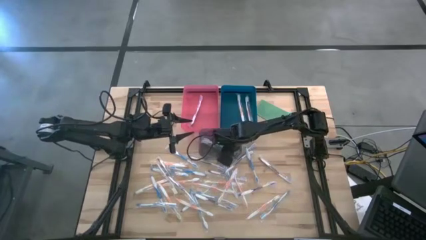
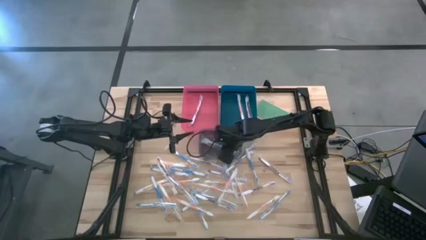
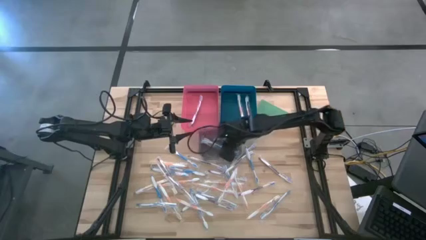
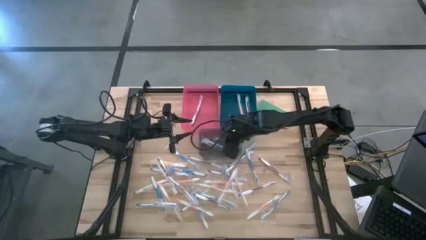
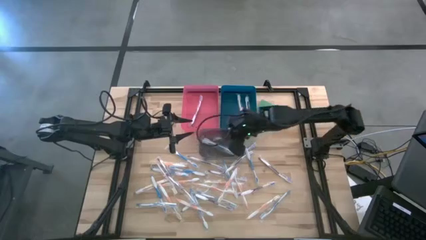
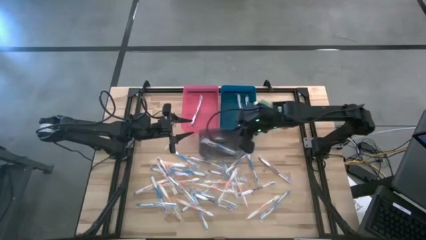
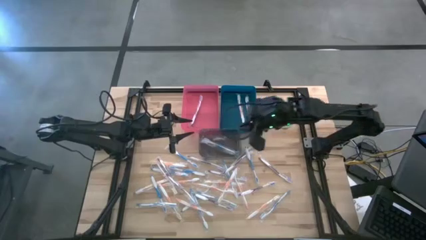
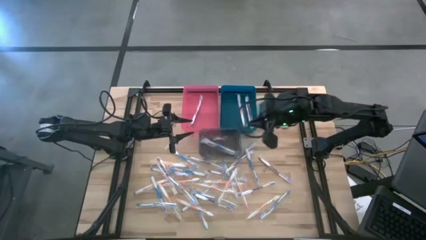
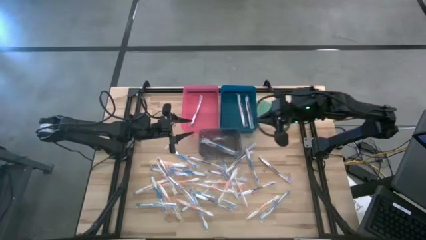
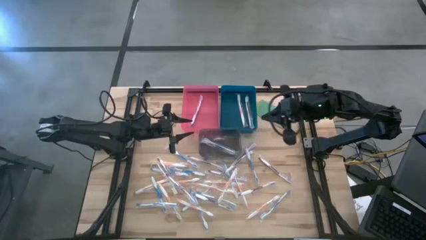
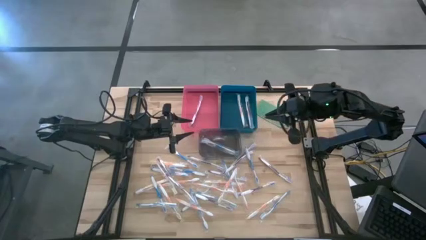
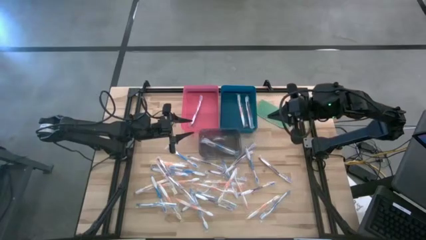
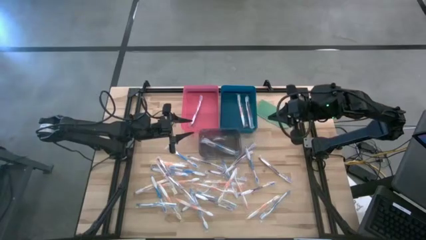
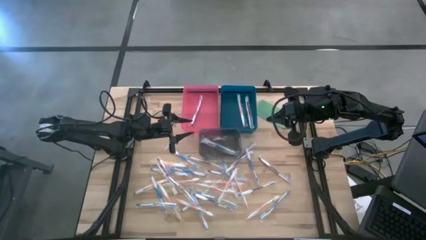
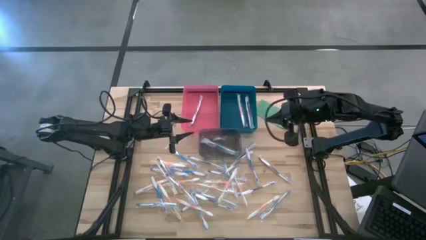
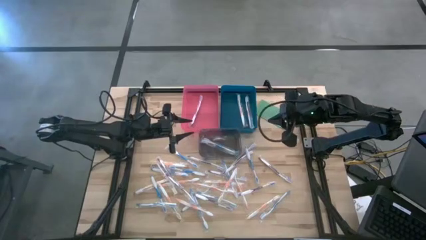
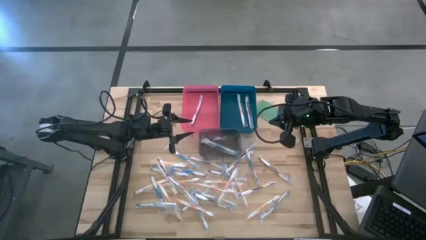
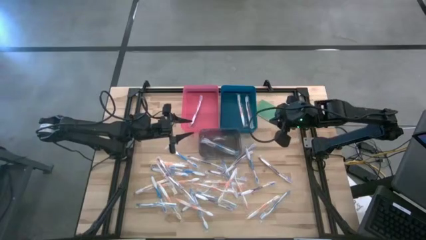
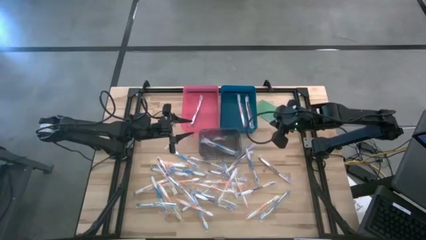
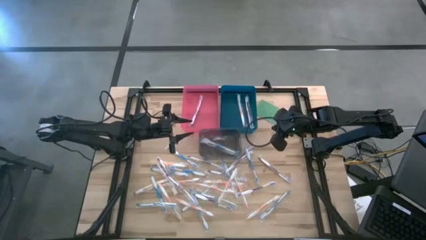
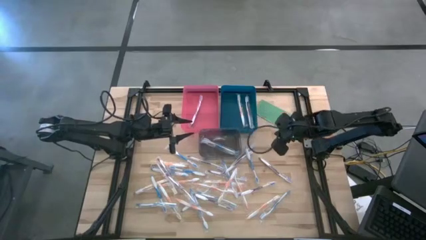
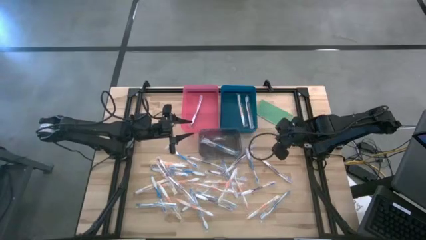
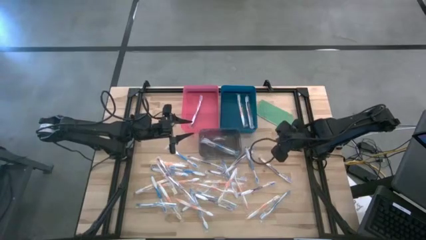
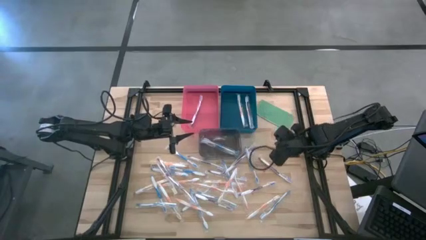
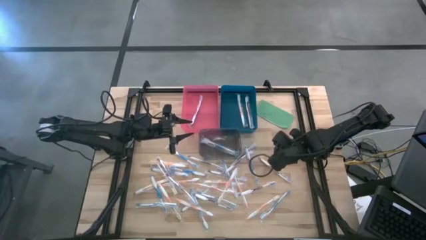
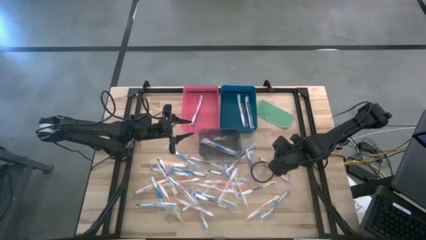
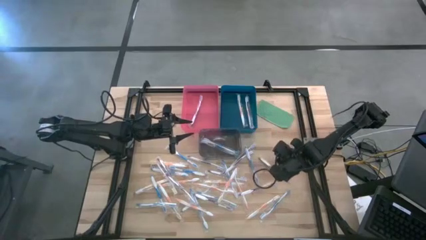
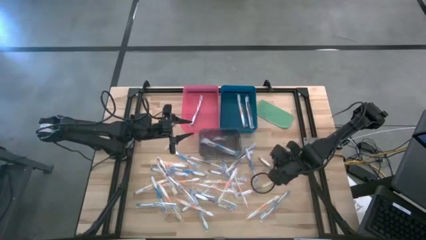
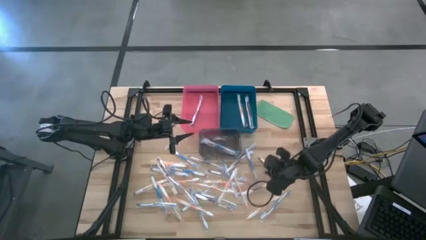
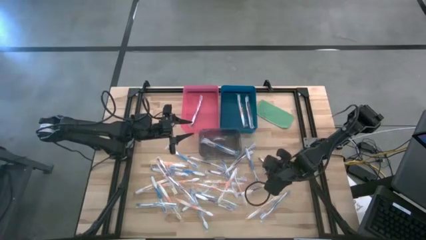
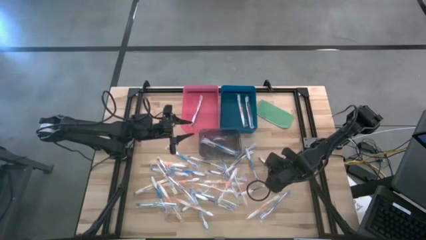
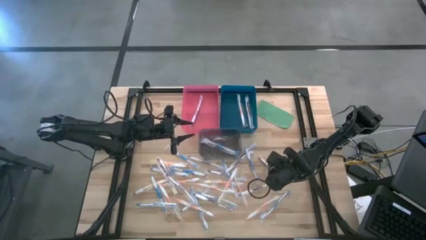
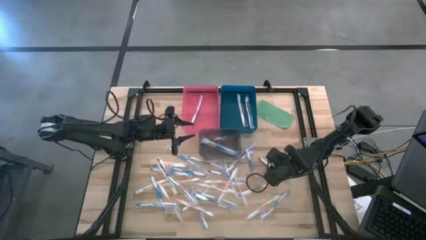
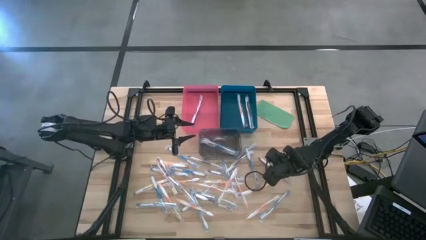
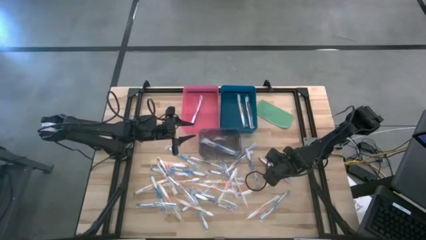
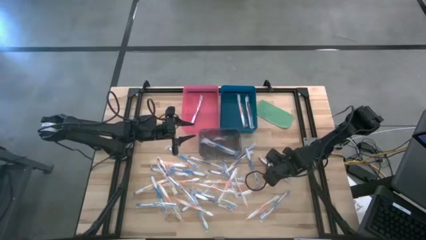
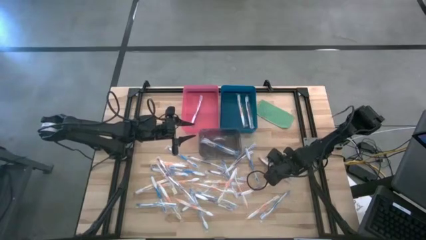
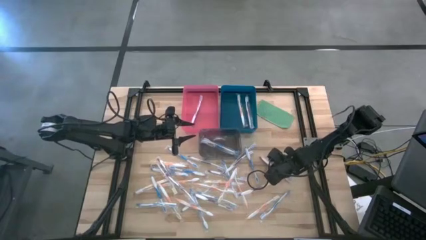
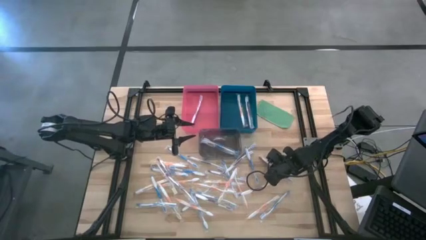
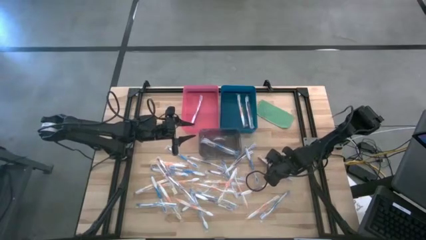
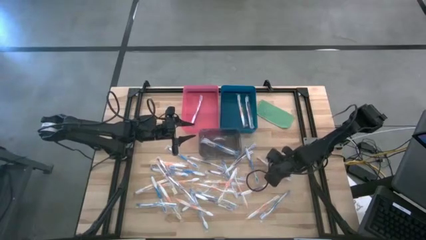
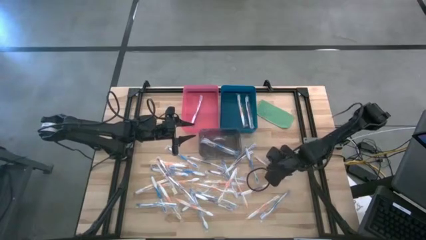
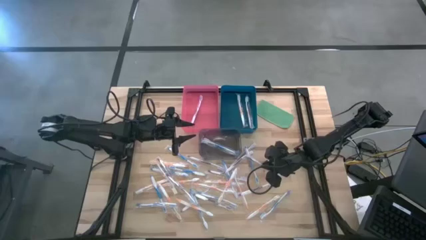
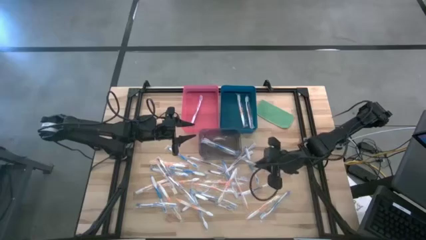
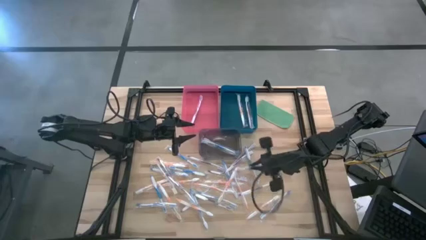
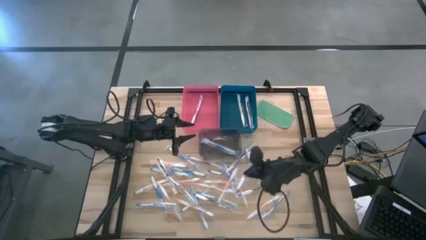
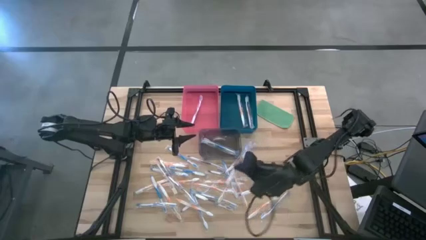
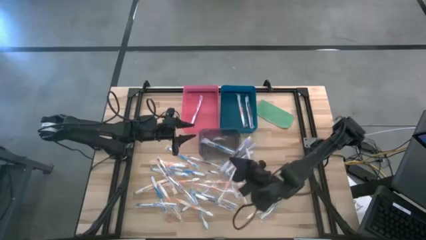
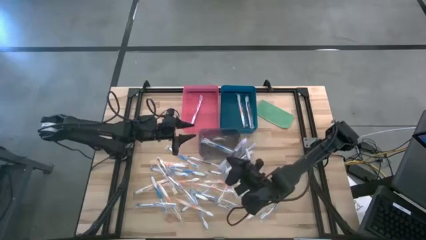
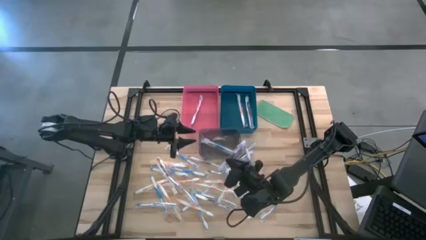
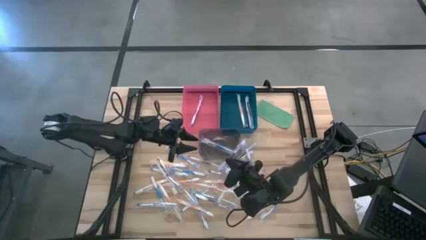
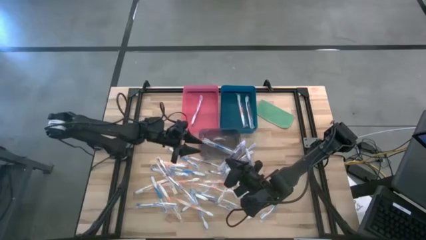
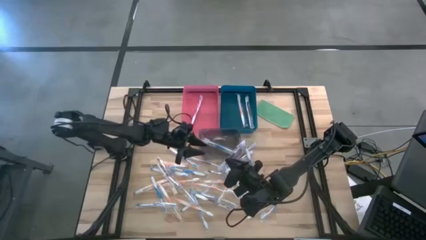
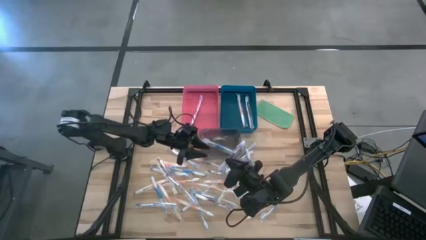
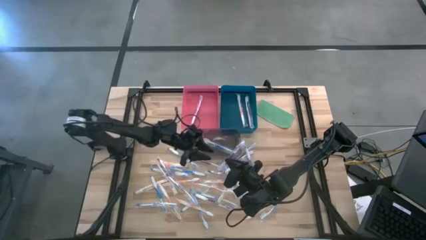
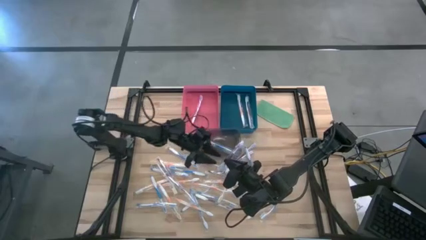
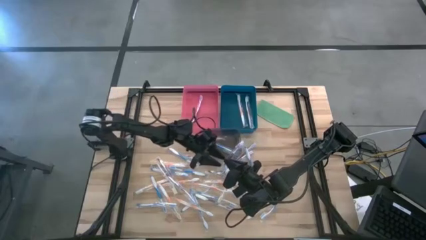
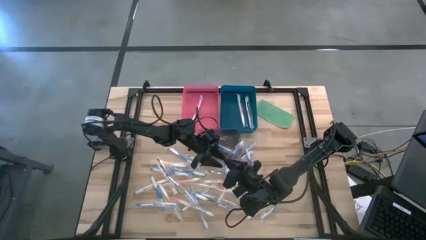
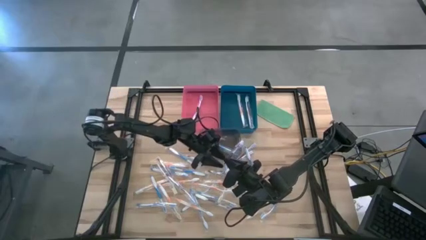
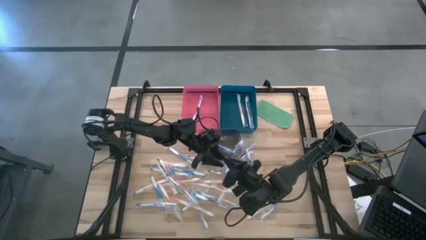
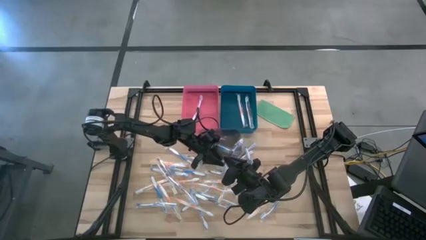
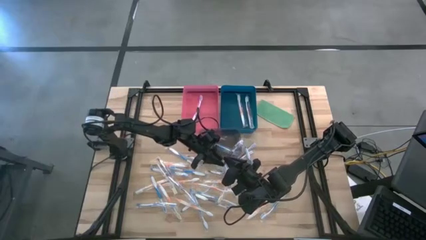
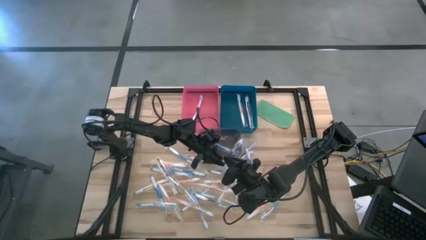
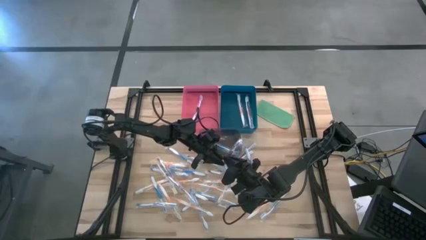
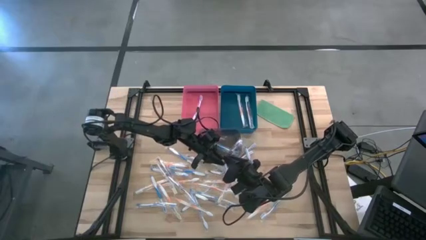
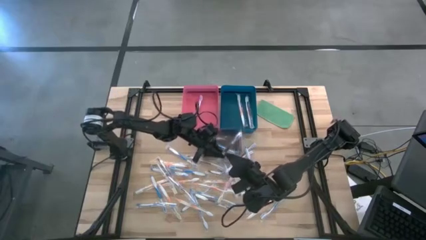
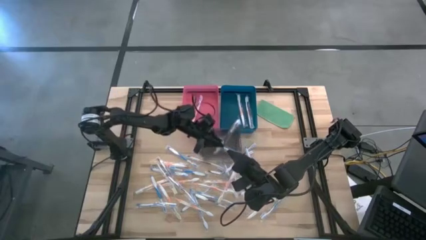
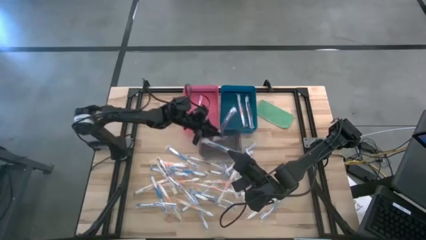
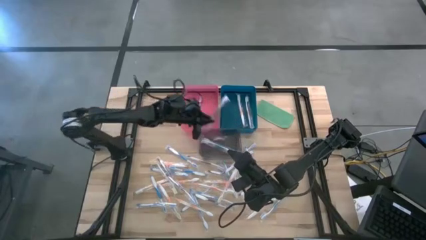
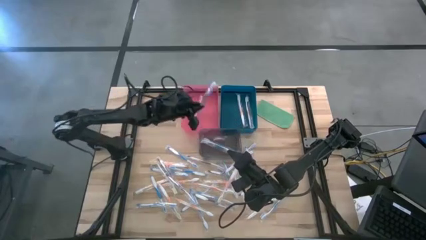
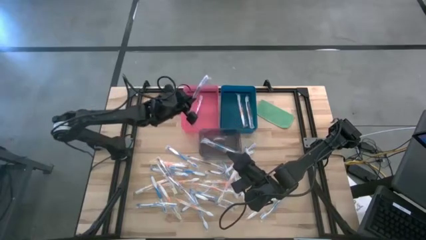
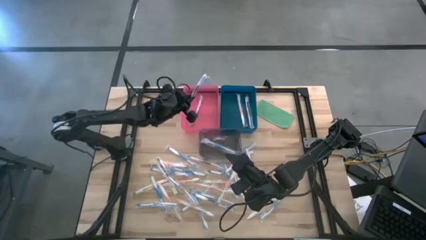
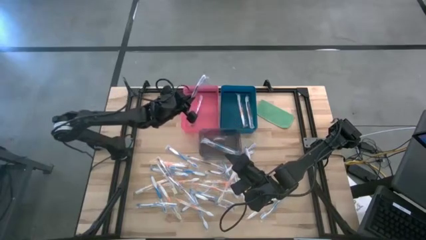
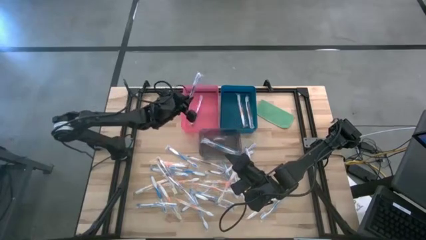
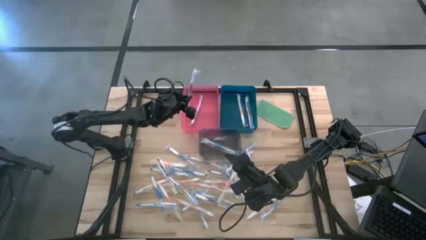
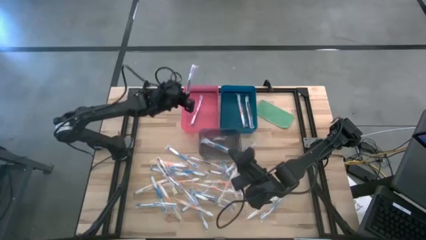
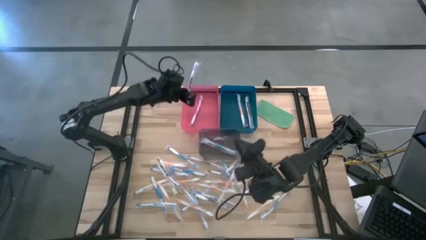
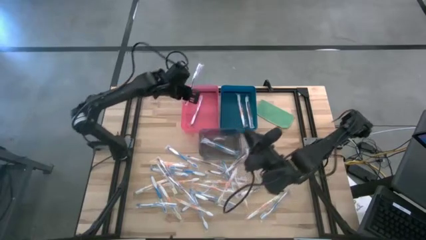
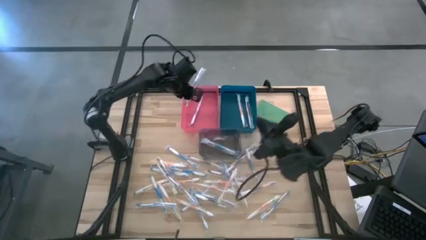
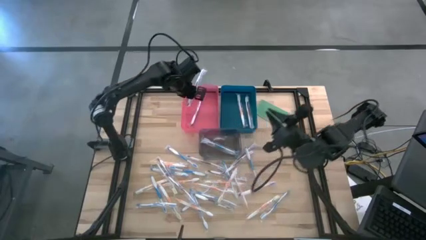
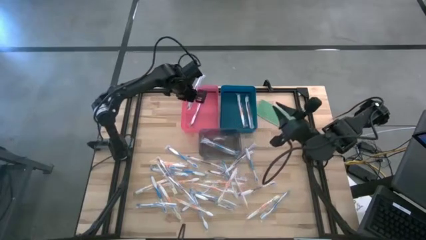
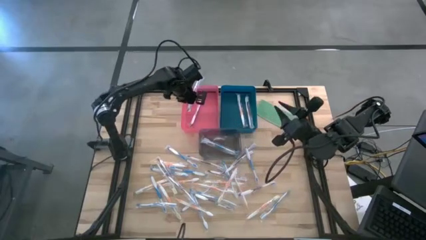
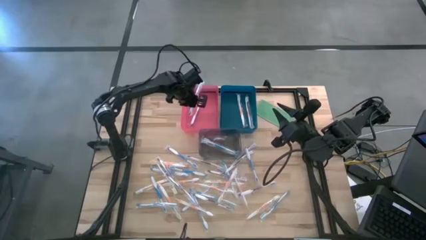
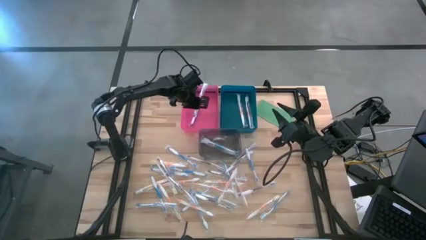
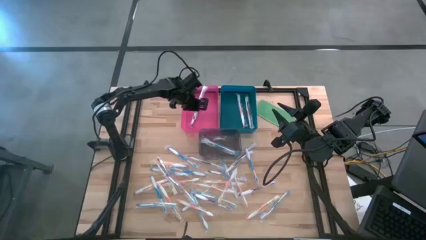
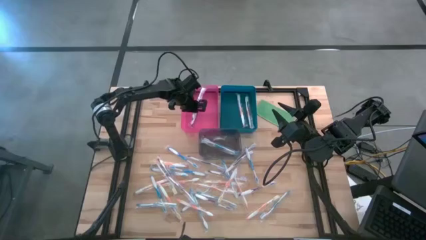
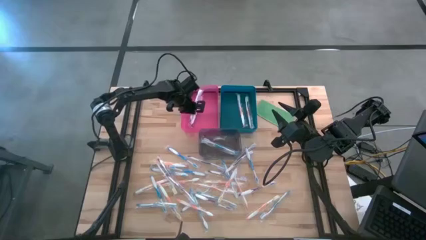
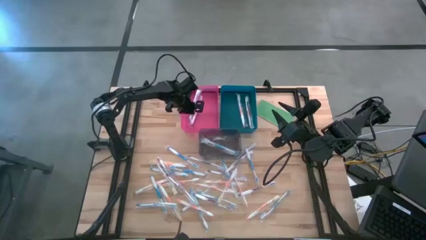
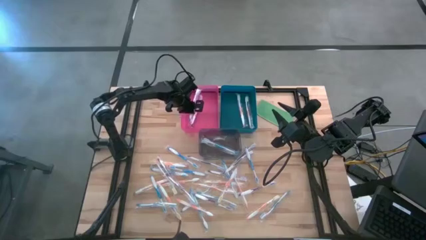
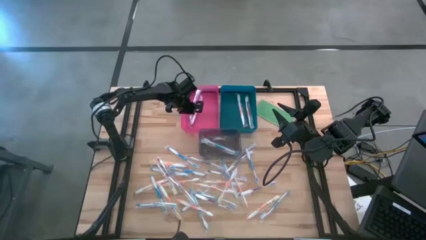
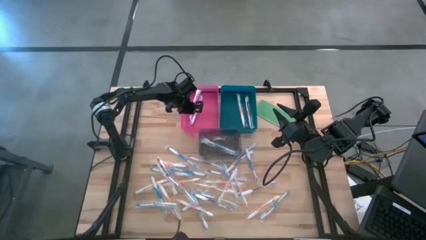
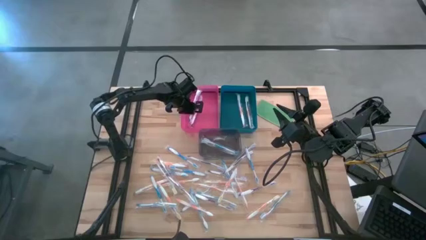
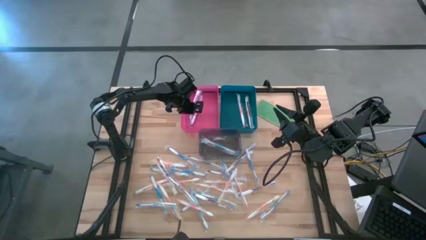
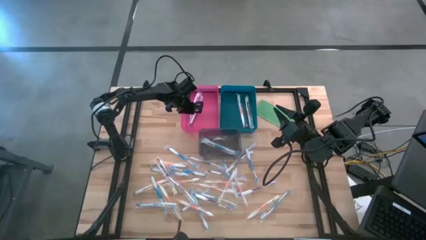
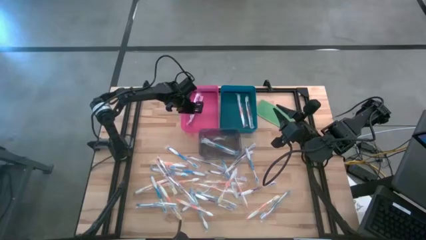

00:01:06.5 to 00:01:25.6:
Task: Pick & Place Toothbrushes
Put the purple toothbrush into the pink bin
